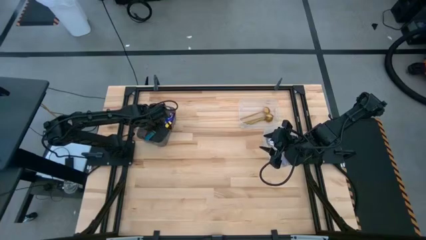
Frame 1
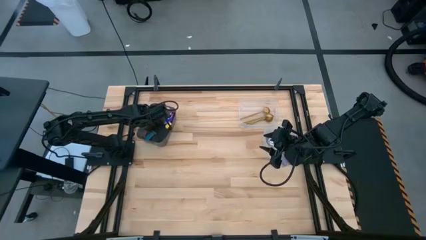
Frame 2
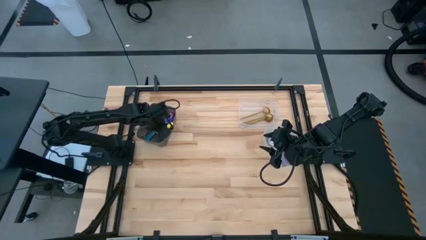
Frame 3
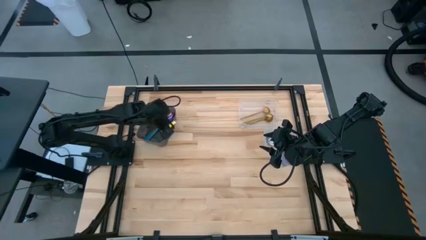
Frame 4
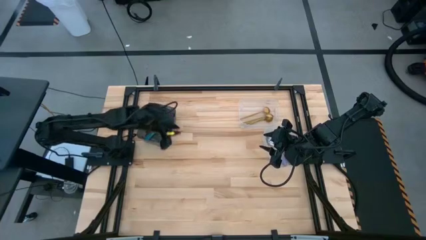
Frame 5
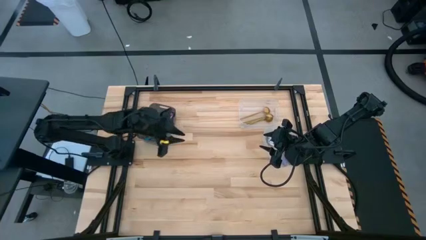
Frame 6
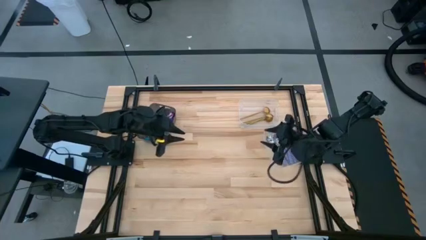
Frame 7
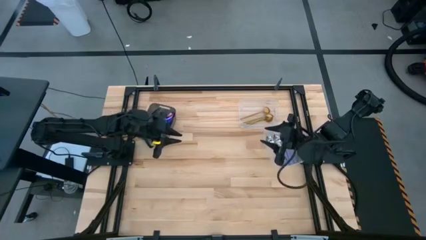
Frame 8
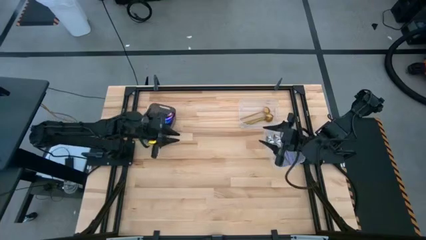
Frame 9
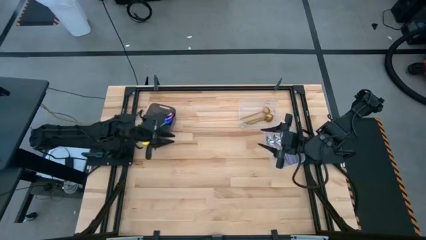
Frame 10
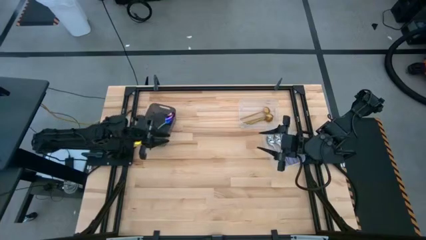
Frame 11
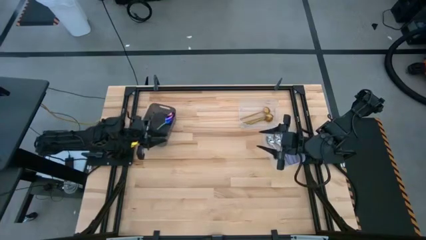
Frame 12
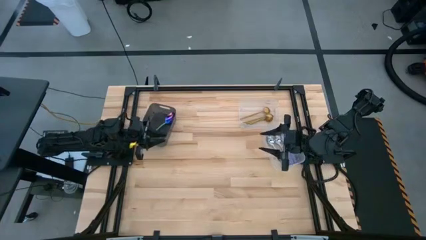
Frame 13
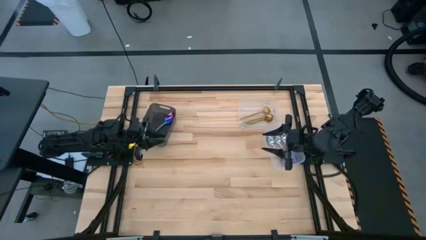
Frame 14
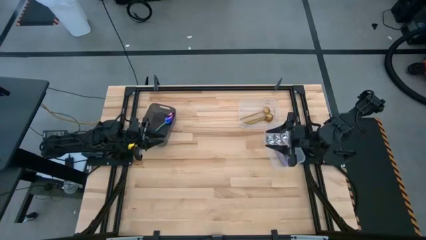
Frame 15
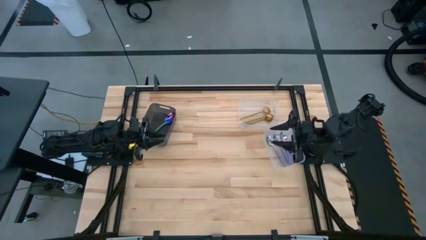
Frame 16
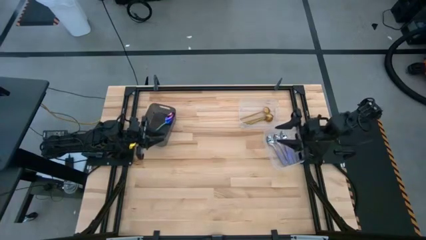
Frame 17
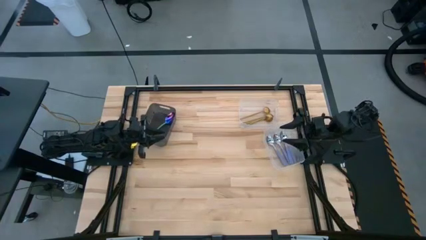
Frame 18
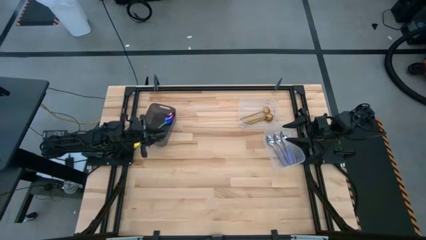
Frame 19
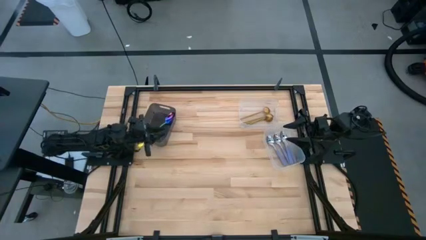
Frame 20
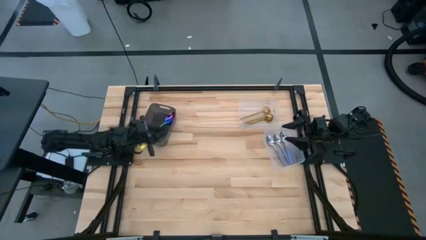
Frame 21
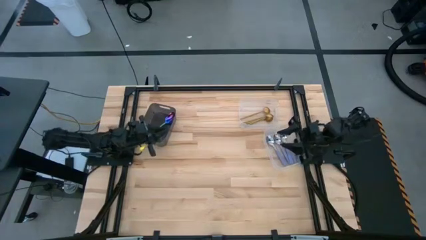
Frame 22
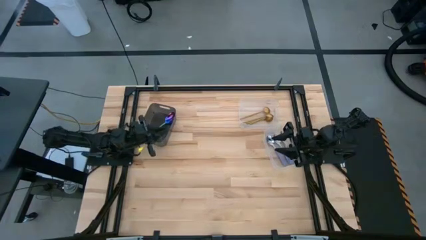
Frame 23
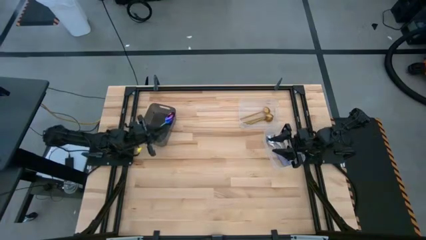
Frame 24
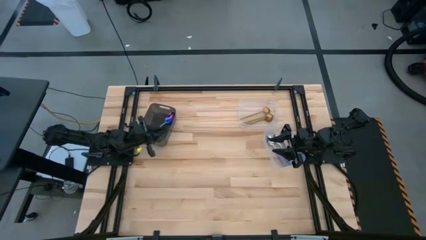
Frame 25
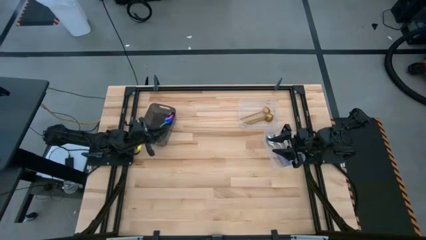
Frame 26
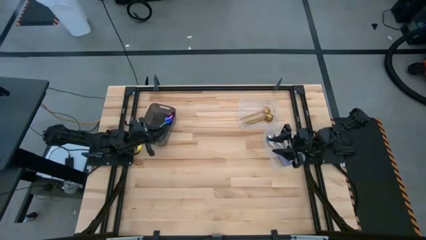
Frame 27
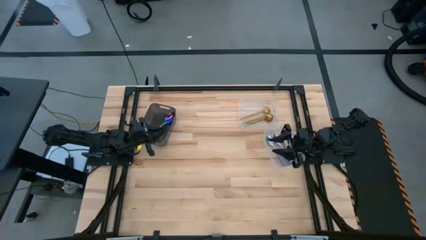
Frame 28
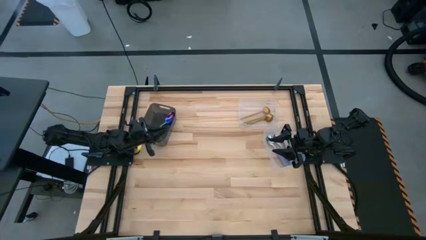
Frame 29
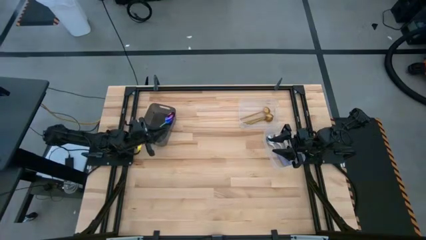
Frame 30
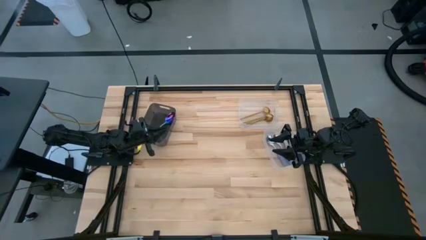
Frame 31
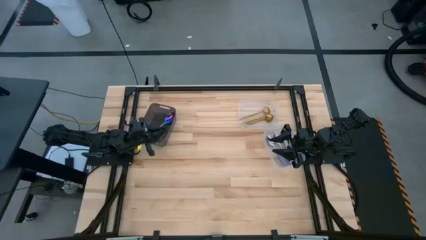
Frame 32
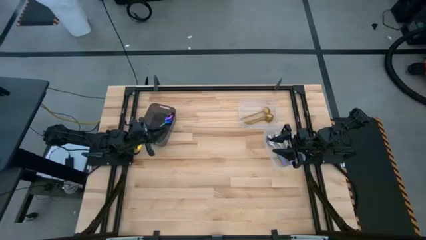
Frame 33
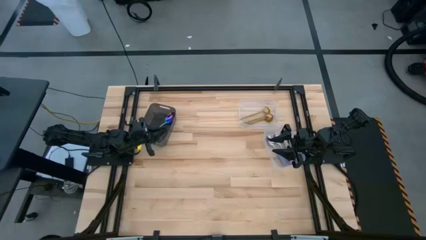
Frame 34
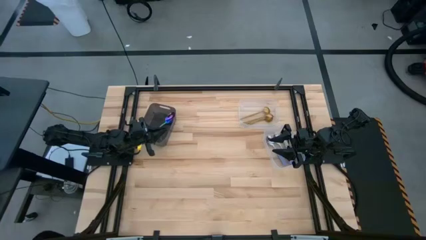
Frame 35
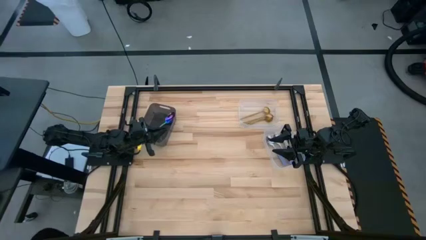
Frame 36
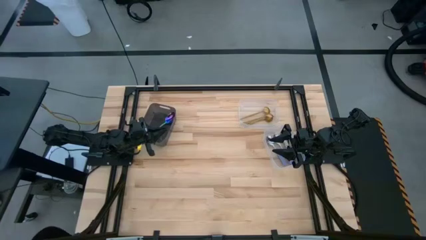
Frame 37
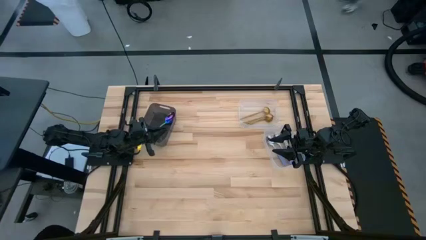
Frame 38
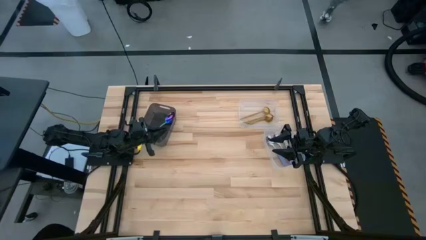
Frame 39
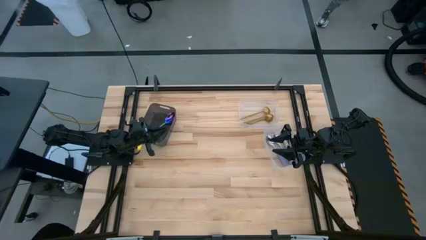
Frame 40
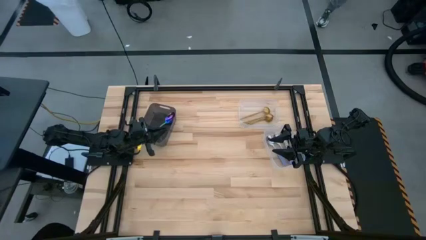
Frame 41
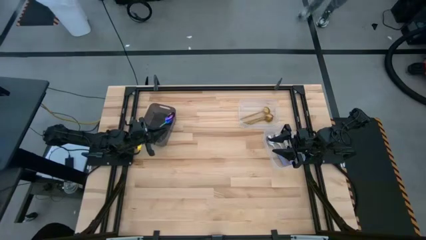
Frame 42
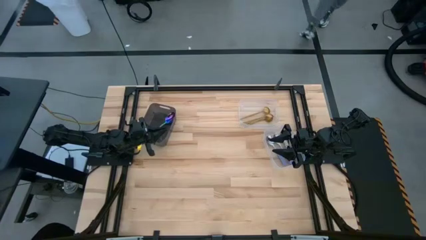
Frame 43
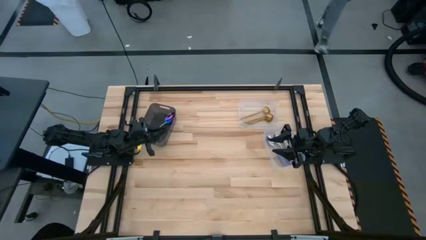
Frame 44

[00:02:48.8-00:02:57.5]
Task: Sort silverware by color (type)
Return to Home Position

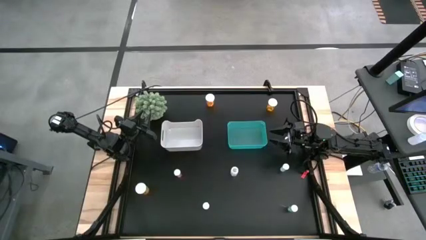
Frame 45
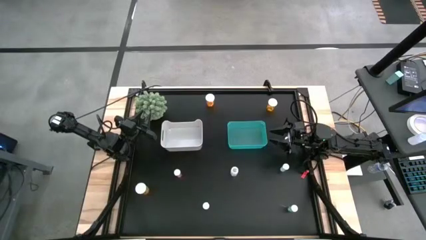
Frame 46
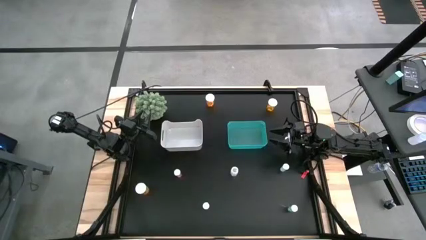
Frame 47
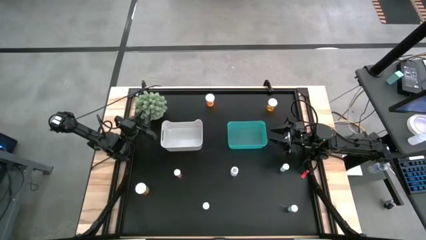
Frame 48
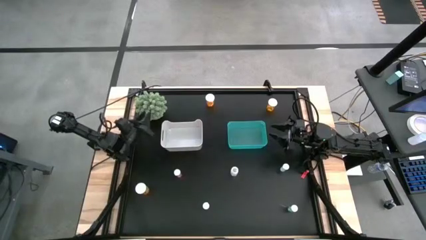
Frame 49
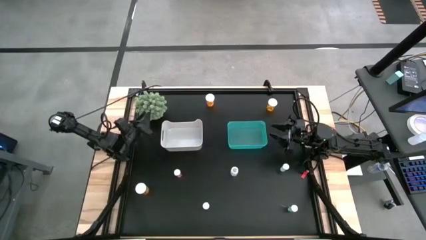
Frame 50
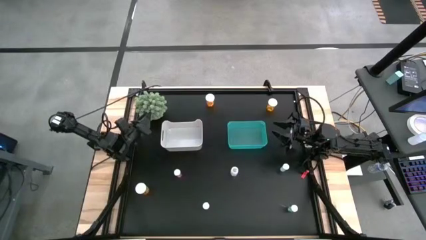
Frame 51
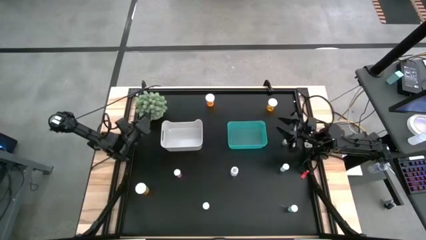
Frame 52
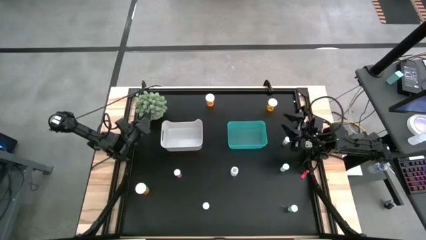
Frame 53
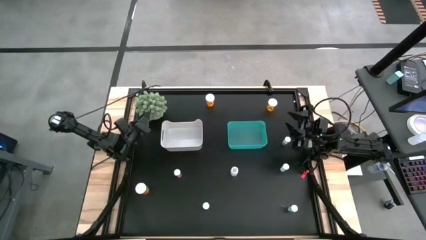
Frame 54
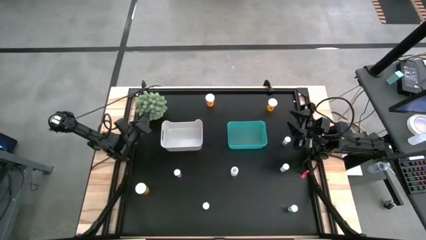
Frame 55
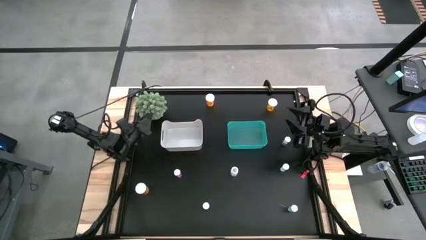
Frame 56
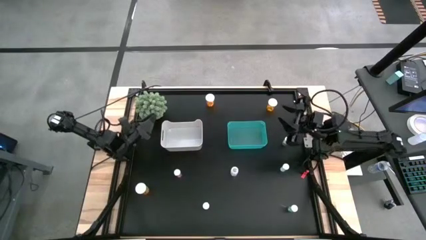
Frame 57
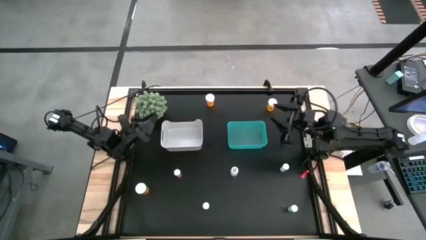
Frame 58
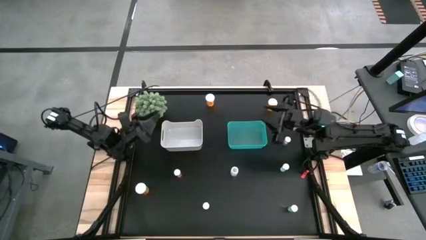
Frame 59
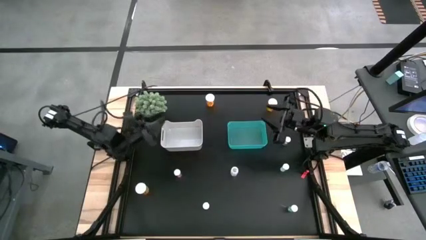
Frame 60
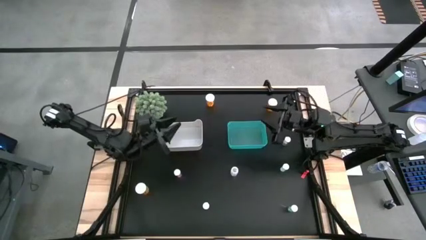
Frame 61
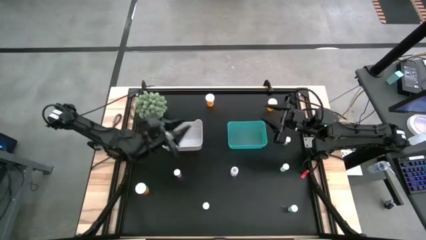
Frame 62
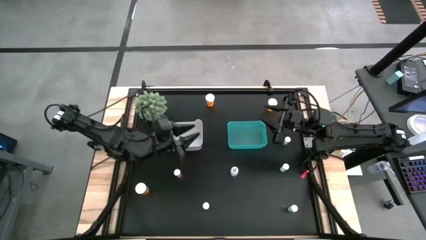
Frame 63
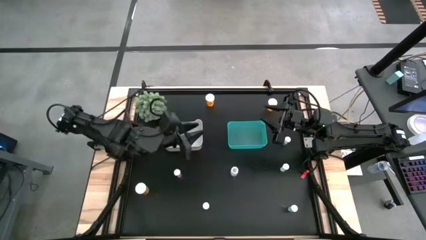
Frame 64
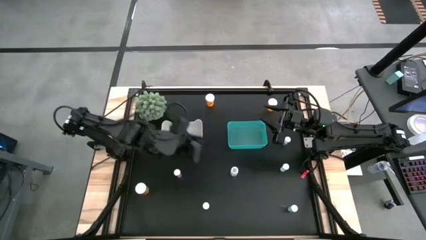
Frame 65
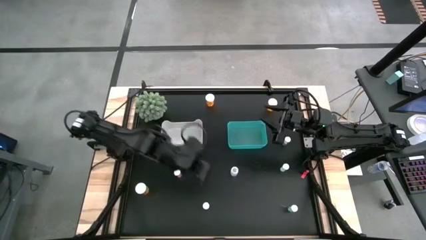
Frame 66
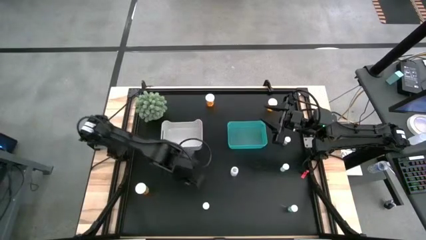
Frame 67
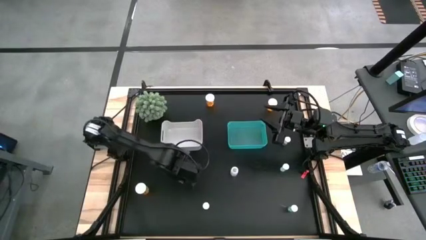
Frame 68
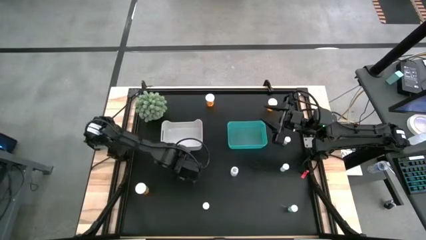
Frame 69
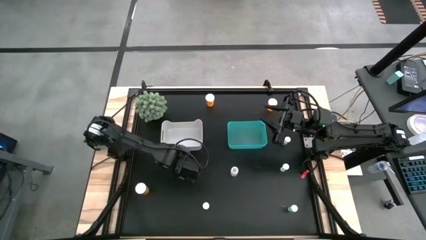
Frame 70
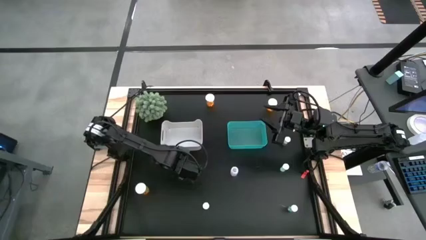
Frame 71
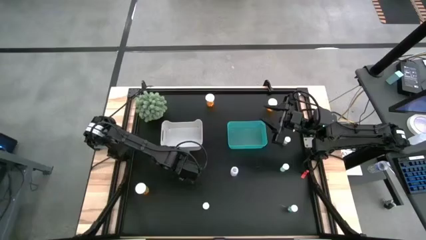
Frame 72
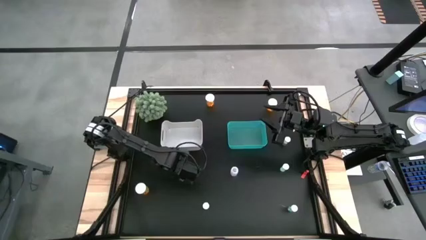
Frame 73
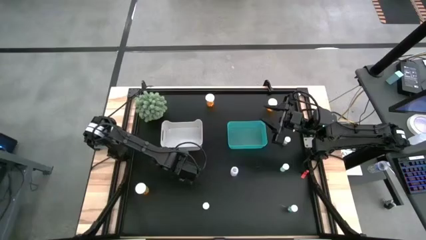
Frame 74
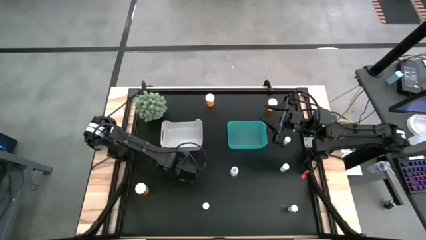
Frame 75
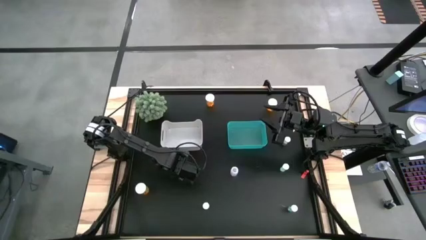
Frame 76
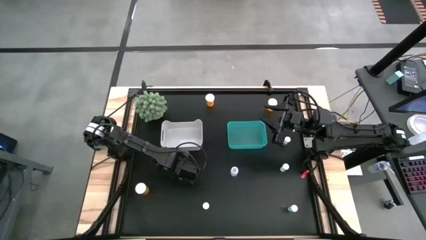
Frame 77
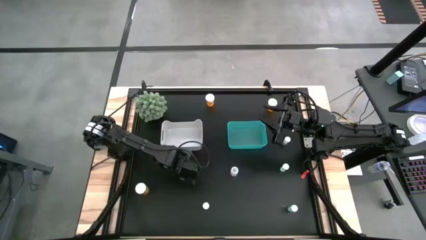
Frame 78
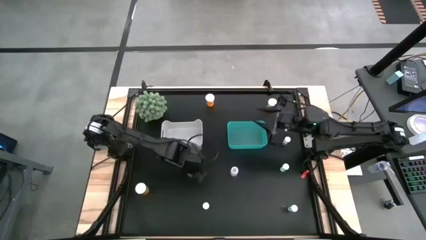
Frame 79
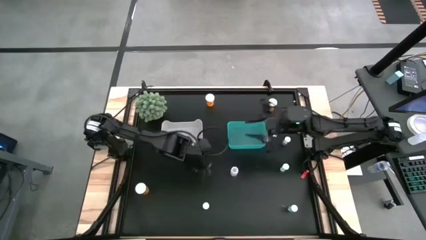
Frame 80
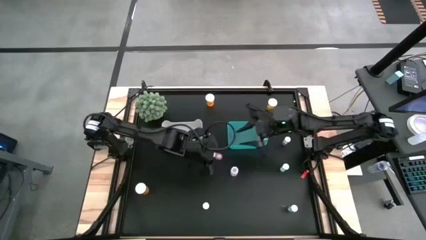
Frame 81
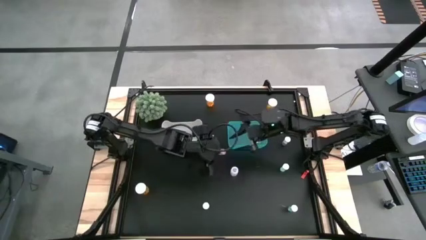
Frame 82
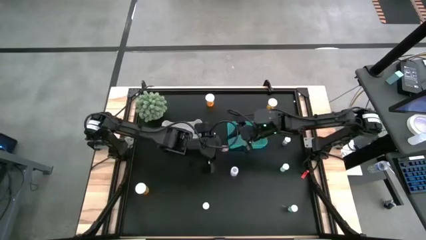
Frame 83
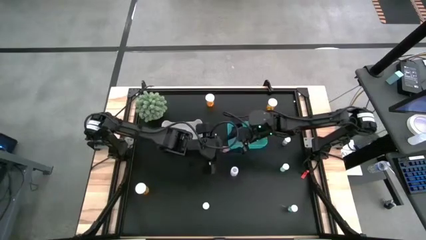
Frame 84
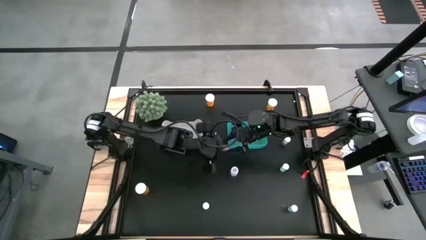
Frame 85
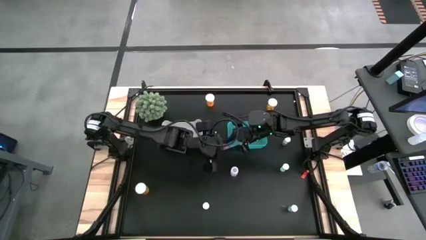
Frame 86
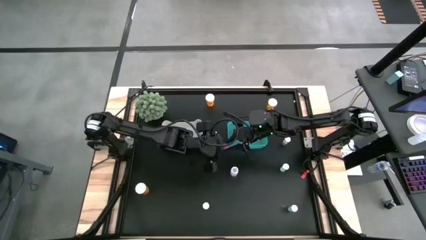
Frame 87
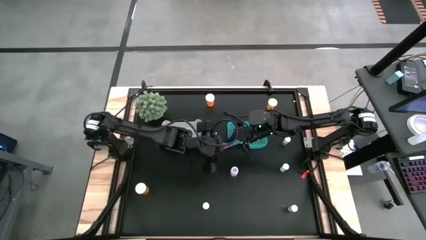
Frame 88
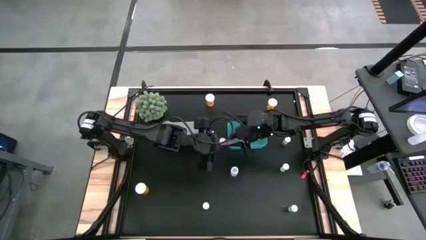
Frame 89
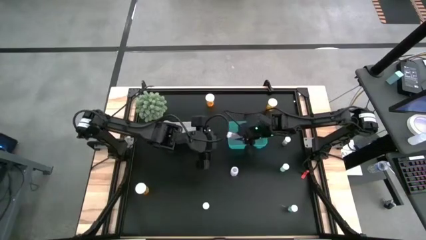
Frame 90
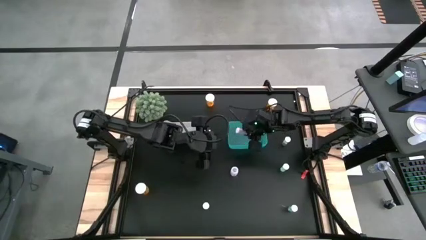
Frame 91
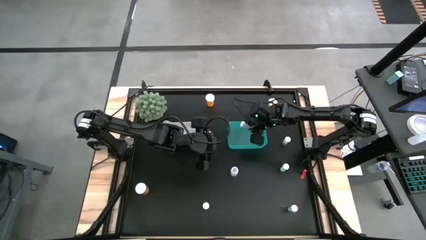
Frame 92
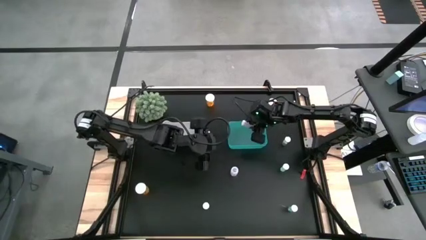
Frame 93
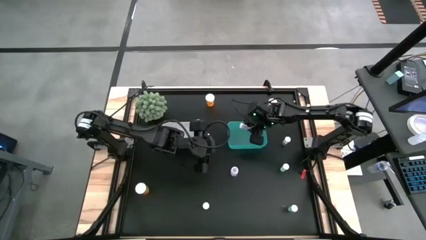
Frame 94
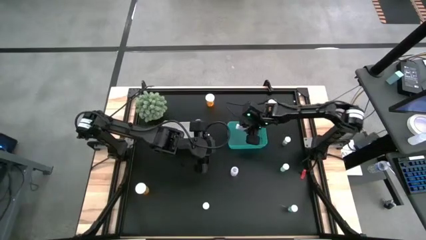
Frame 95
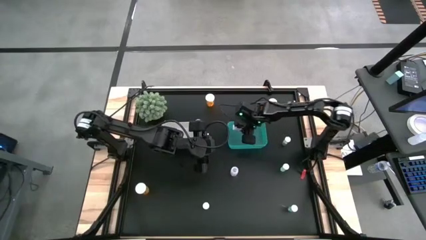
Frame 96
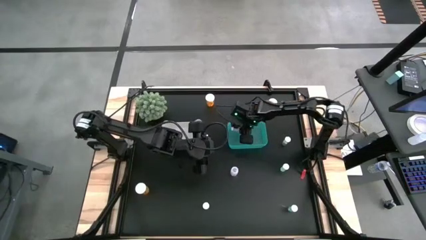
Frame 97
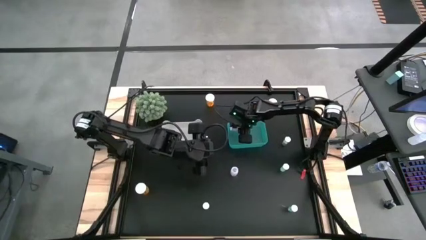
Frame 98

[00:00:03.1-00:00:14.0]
Task: Pick and place medicine bottles into bin by pill shape (circle, oval)
Put the small pink tablet bottle into the green bin
